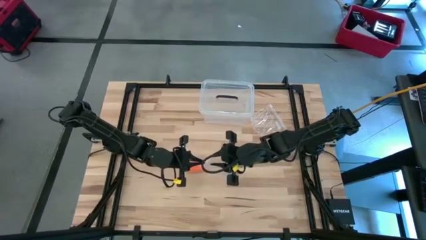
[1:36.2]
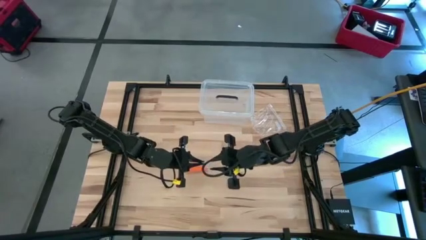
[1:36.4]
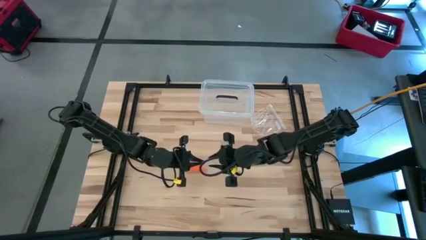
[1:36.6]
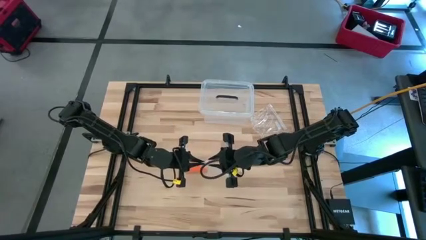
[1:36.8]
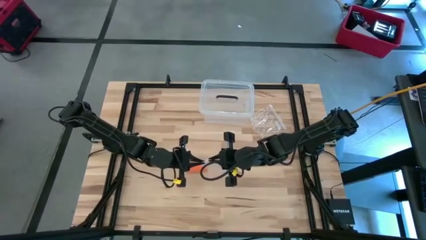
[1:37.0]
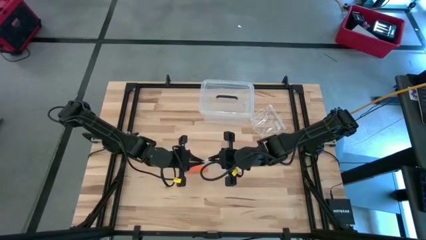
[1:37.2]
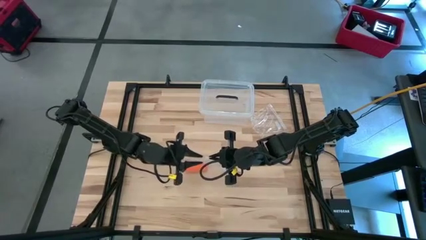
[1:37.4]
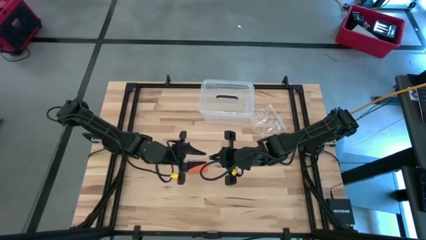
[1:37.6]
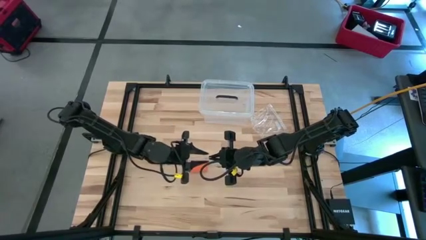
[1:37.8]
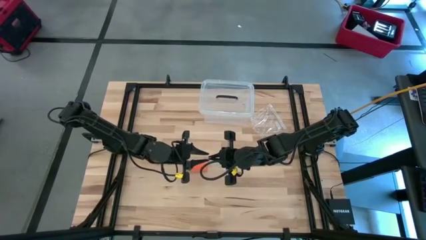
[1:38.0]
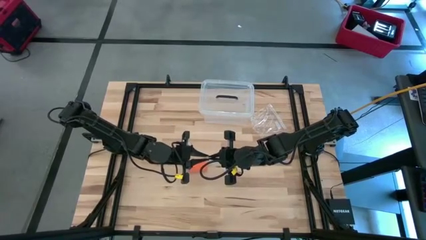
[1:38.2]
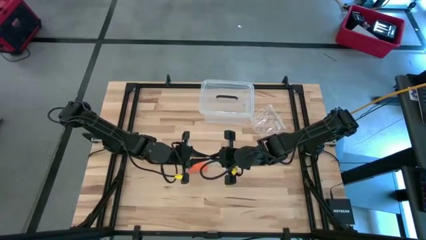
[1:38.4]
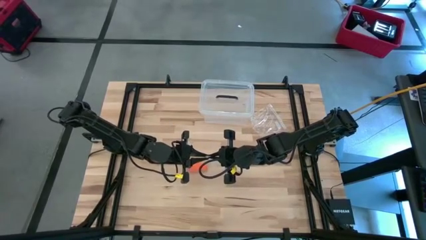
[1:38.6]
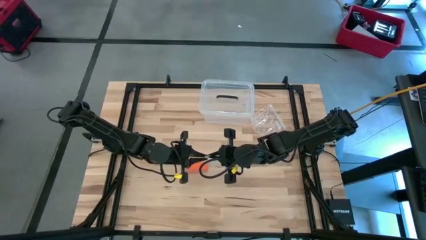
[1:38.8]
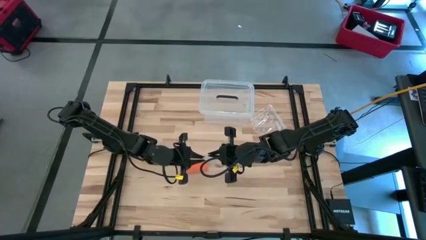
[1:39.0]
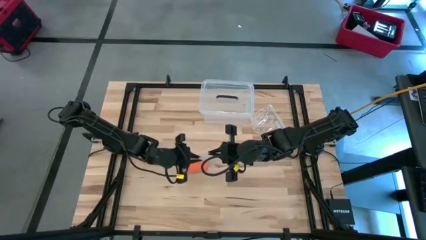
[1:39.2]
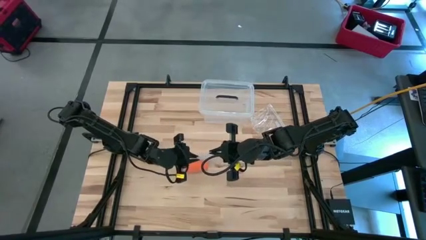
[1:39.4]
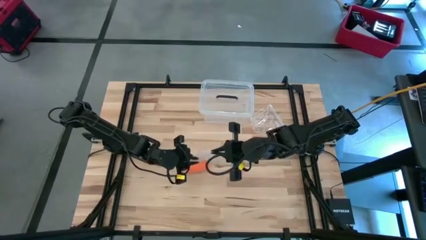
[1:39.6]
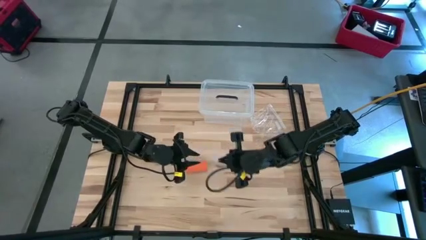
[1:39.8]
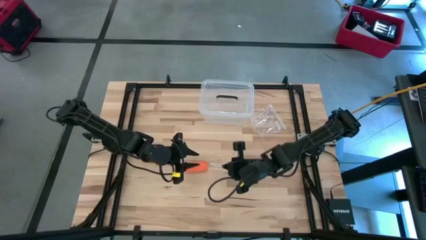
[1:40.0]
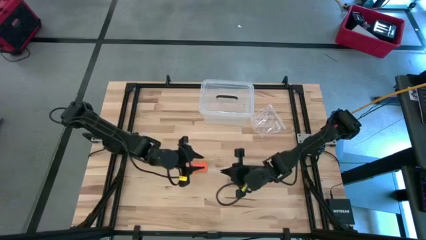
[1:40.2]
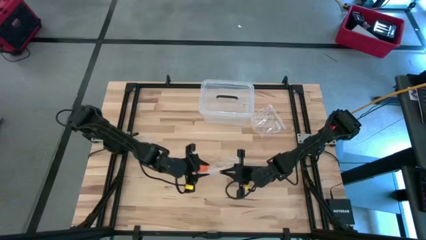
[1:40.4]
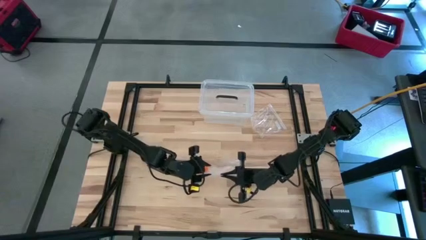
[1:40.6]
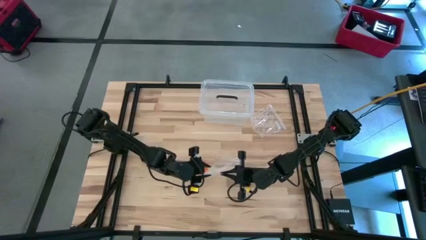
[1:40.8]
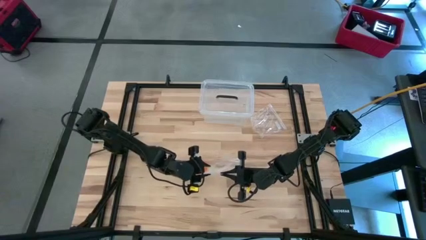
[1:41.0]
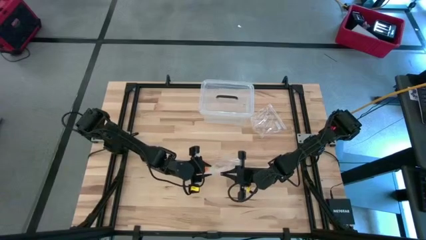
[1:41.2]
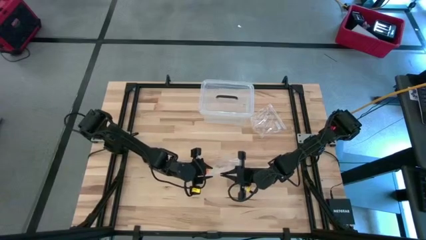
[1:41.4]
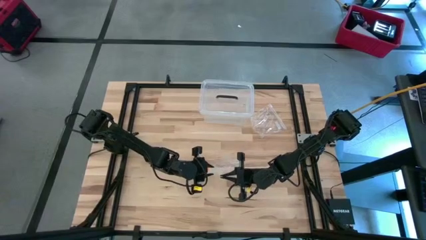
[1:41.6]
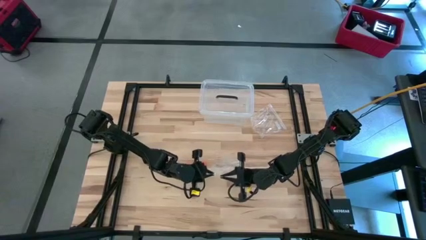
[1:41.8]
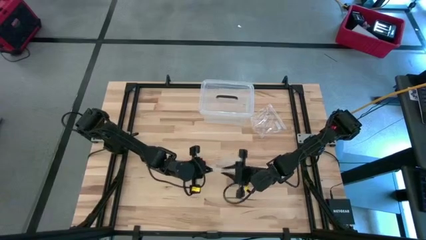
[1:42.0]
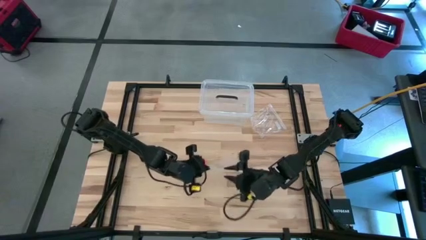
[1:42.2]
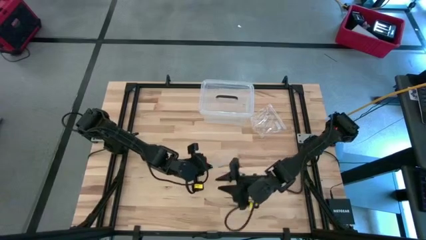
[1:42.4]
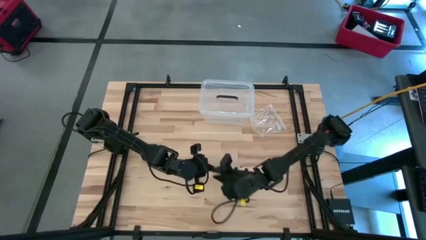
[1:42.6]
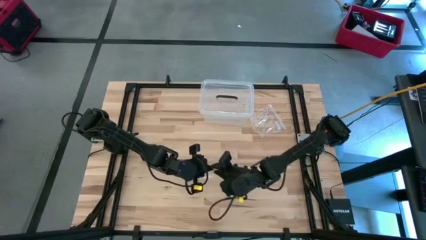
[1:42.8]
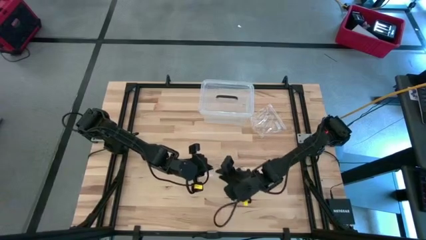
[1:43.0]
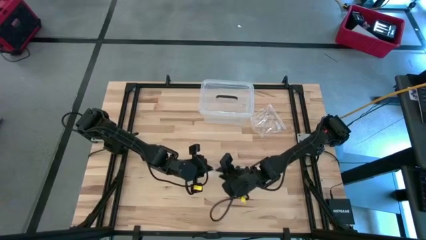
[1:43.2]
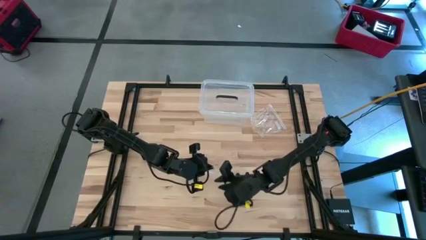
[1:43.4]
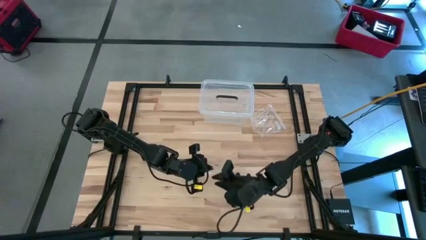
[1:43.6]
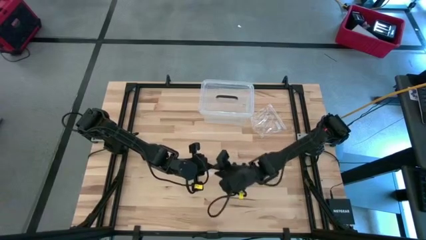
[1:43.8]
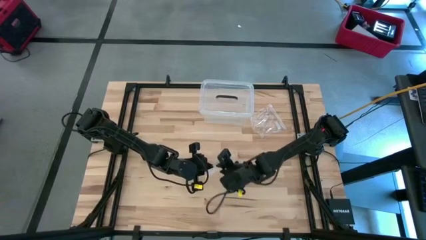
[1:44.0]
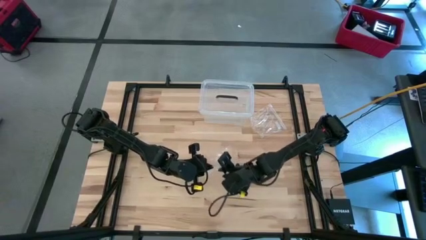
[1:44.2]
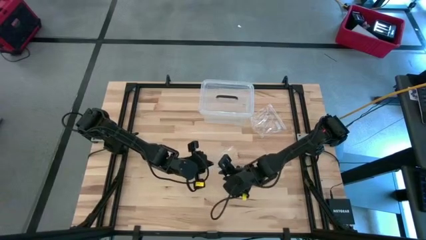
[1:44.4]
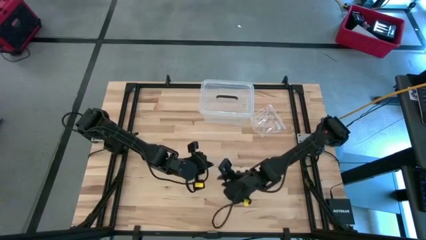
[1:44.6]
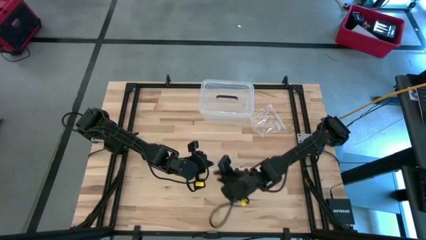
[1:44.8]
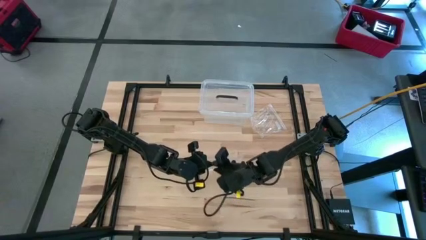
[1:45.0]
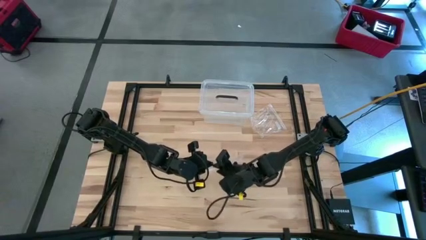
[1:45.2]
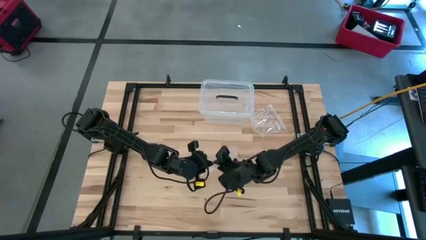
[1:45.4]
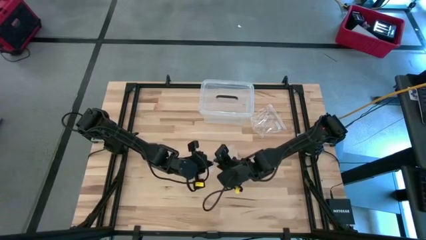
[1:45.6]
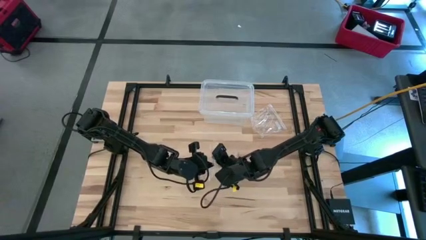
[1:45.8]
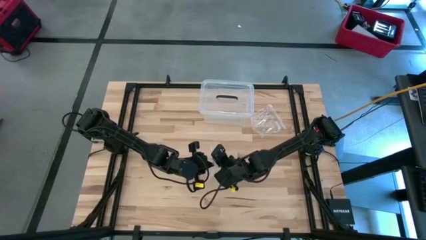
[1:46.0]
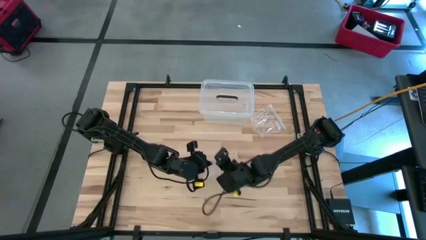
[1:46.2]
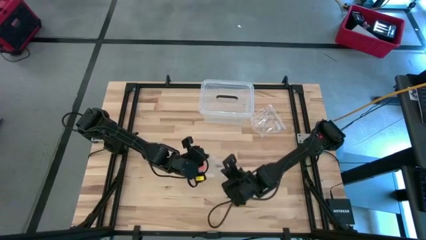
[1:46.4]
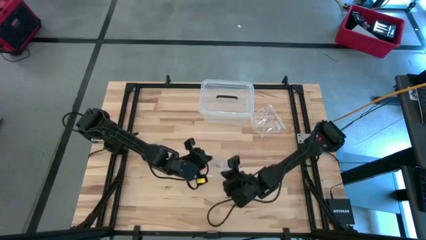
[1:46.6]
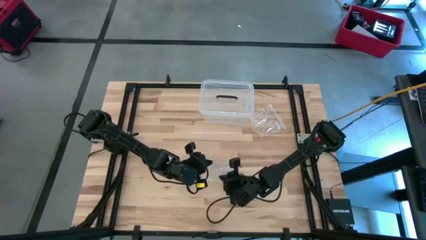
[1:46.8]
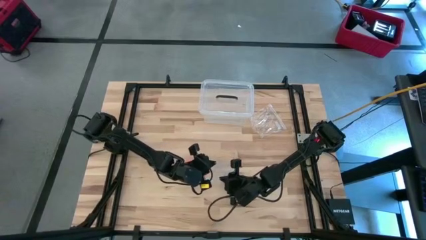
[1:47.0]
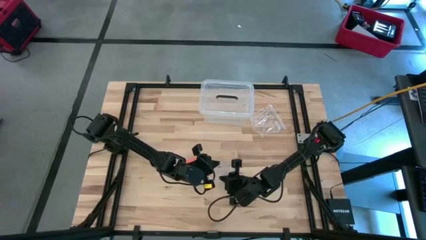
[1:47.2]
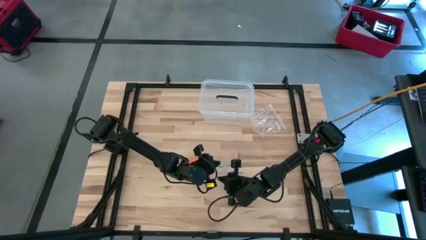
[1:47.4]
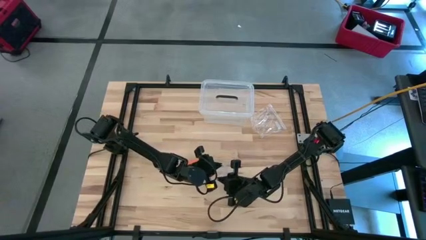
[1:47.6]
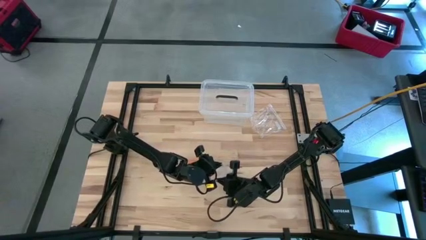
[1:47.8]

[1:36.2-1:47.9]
Task: Roll bandage
Open the bottom transparent zip bag

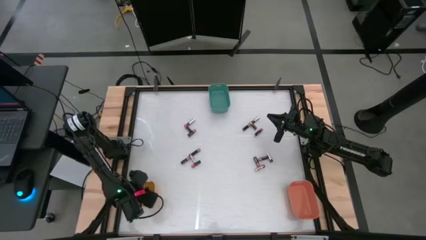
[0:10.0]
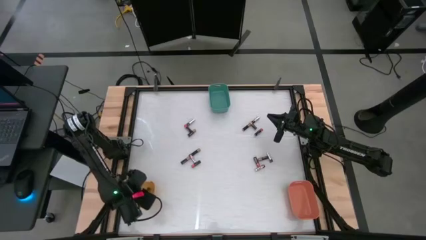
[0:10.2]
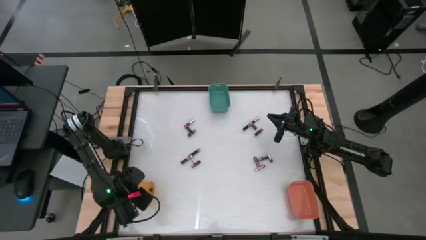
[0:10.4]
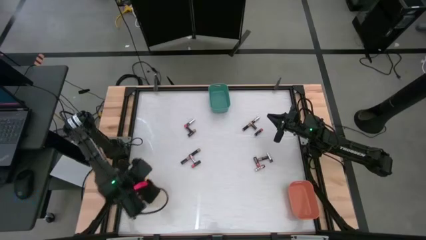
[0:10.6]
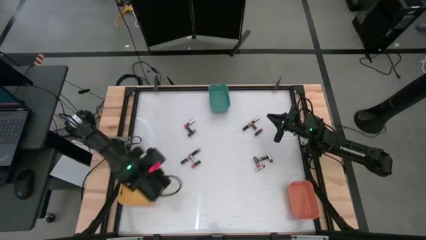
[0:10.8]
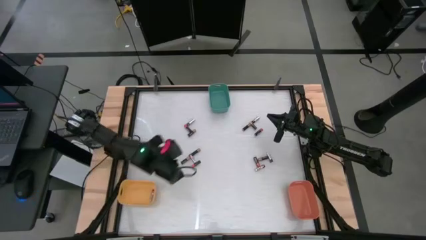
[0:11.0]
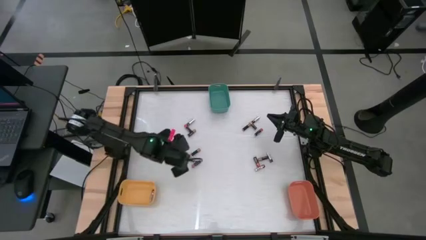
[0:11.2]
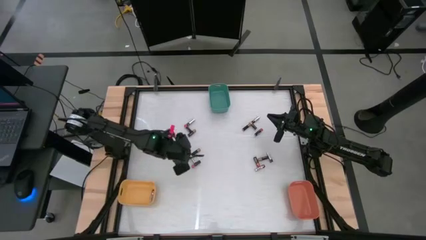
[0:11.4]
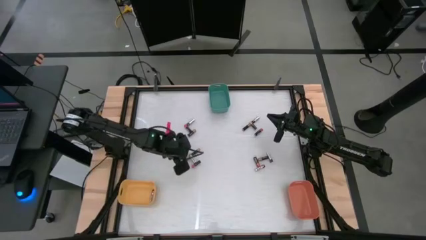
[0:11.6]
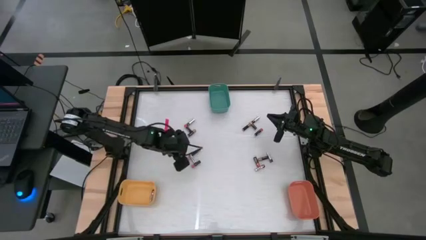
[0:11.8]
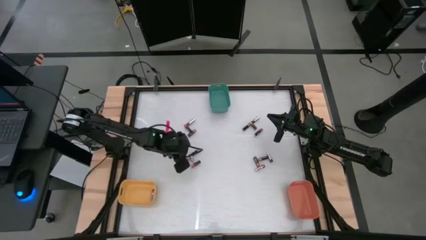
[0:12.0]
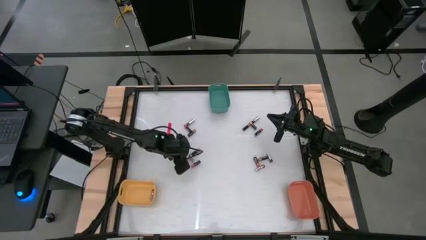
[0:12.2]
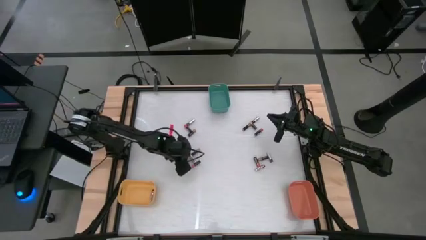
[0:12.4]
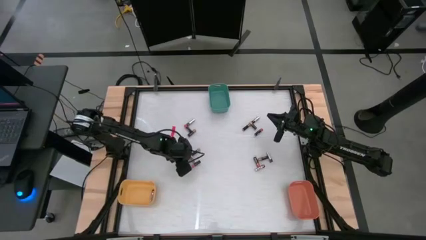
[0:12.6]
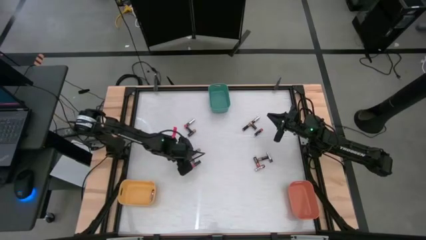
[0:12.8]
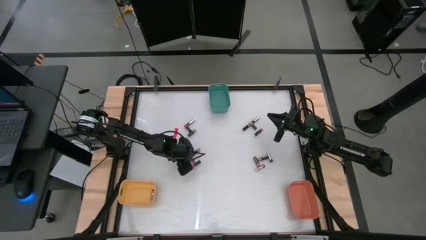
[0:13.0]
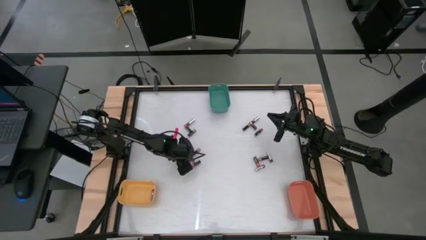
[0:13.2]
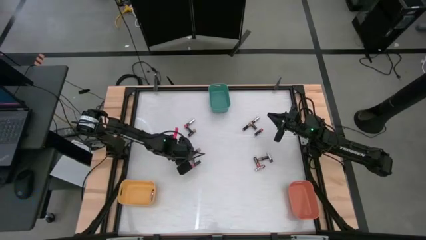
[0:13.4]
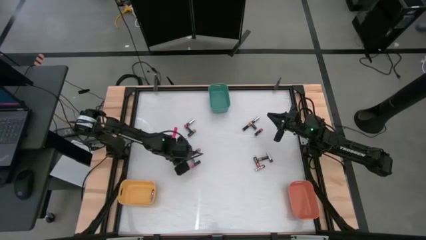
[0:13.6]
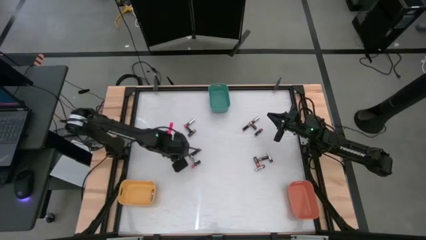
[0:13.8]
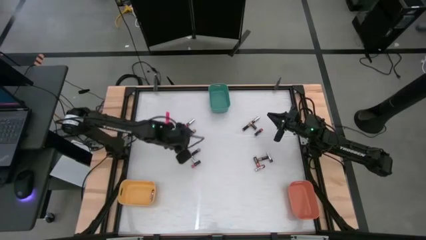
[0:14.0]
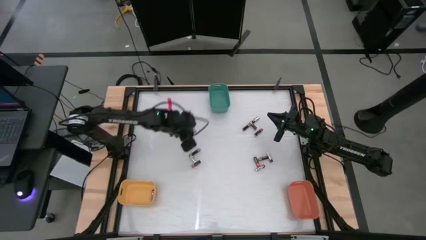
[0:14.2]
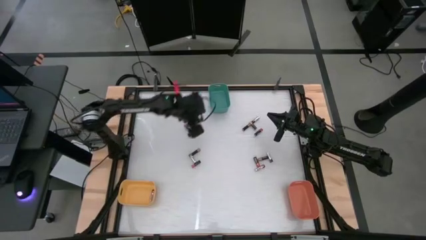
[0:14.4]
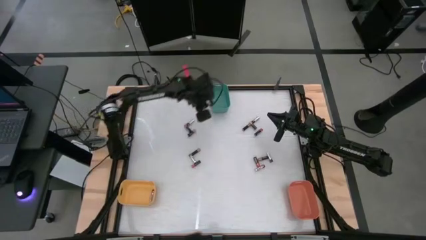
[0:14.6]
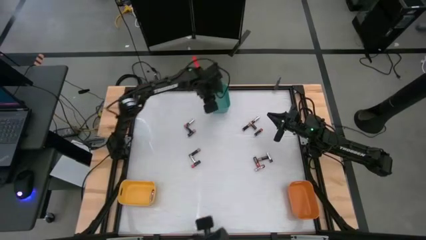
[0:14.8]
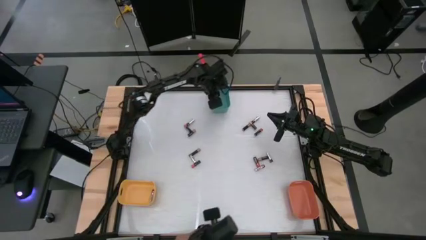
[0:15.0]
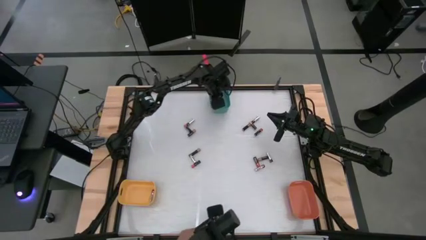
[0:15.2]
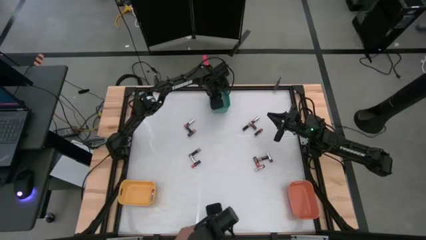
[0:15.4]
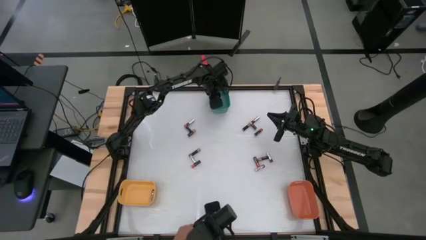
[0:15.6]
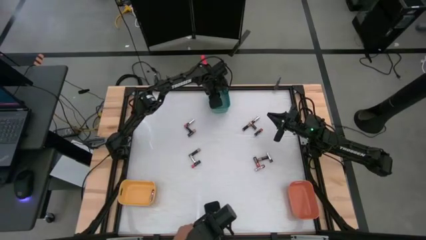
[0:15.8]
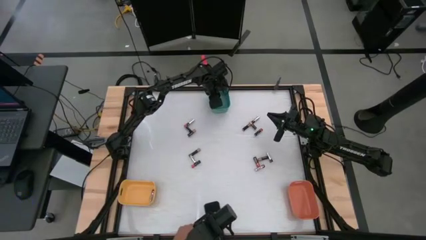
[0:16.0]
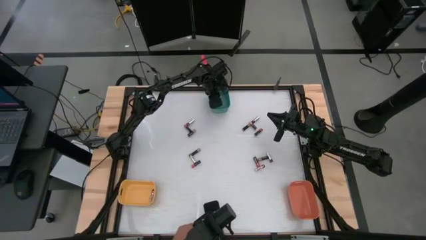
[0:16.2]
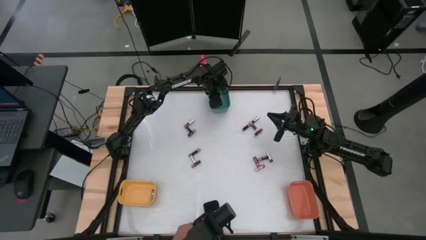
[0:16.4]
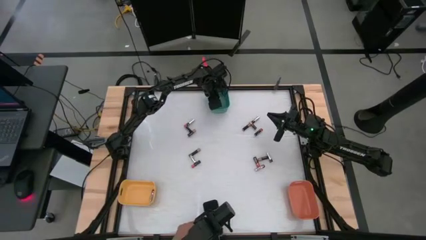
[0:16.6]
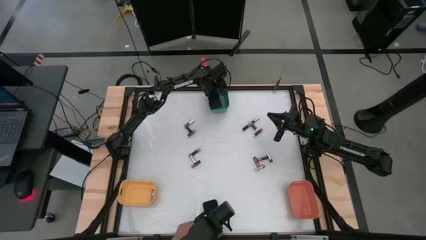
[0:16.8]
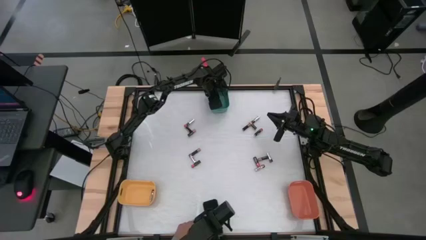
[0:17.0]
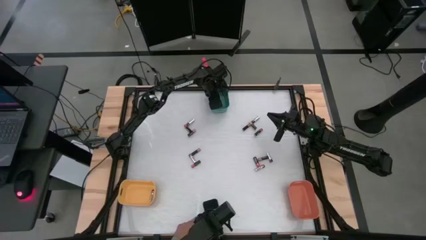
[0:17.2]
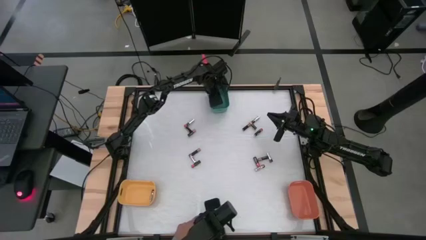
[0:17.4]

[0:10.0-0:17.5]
Task: Sort batteries
Put the brown battery into the green bin
